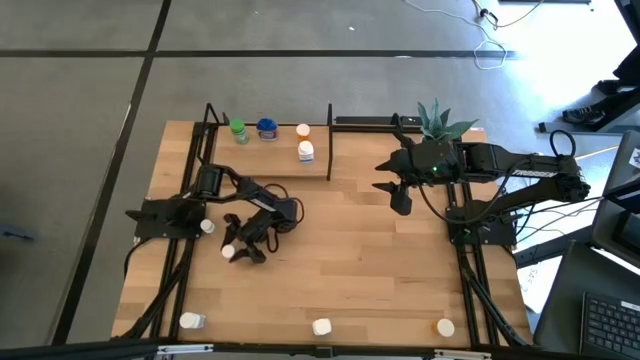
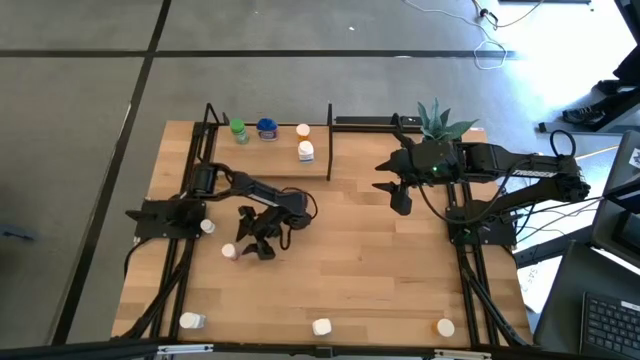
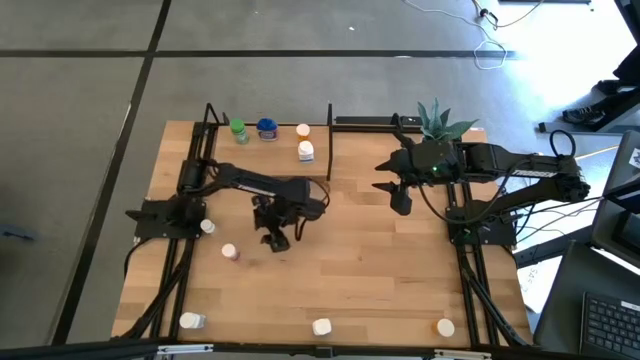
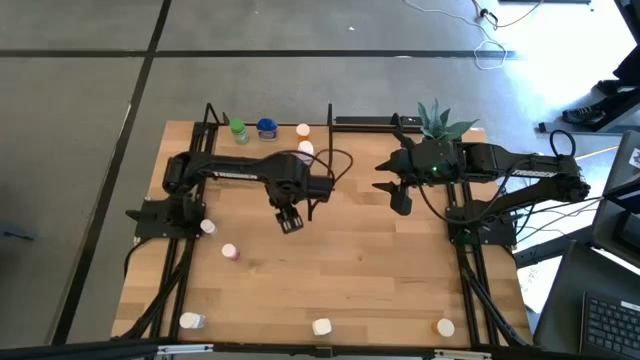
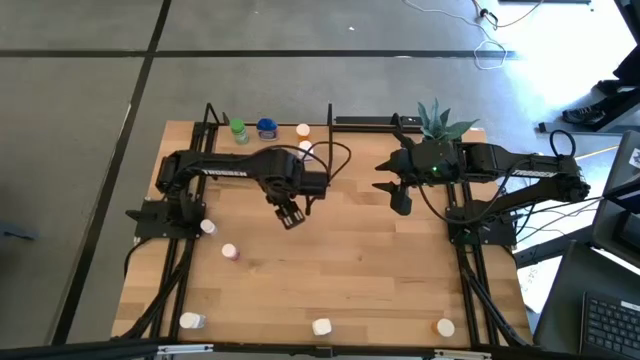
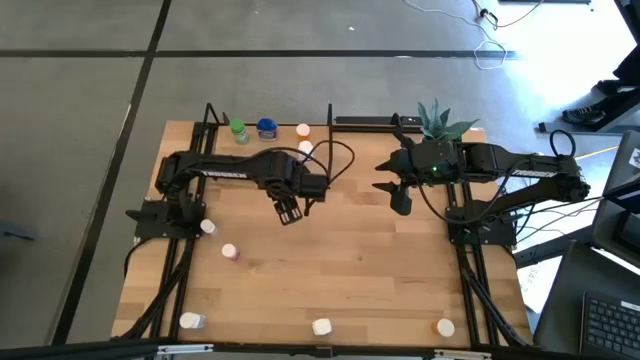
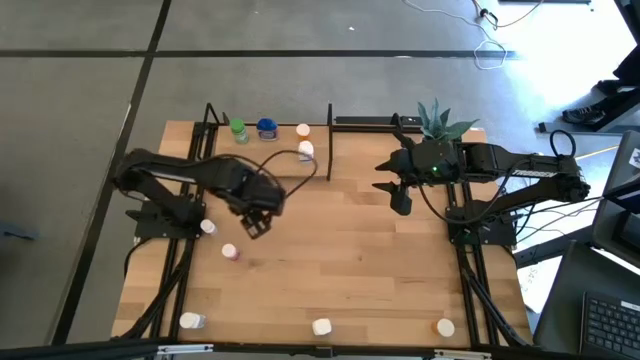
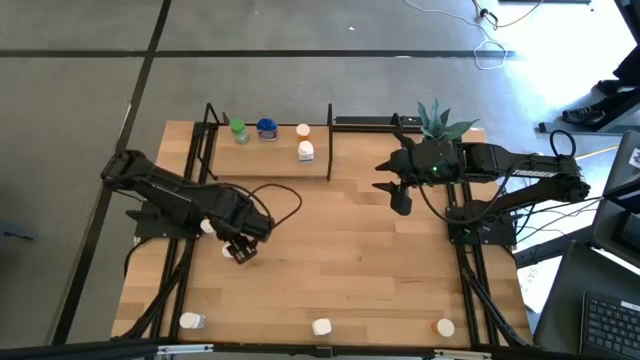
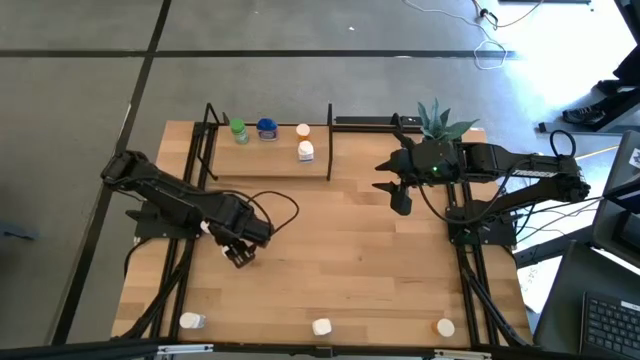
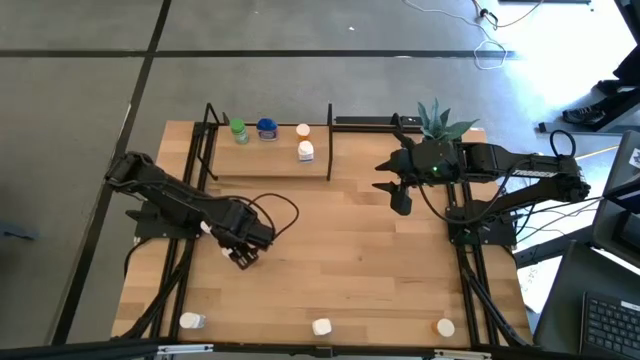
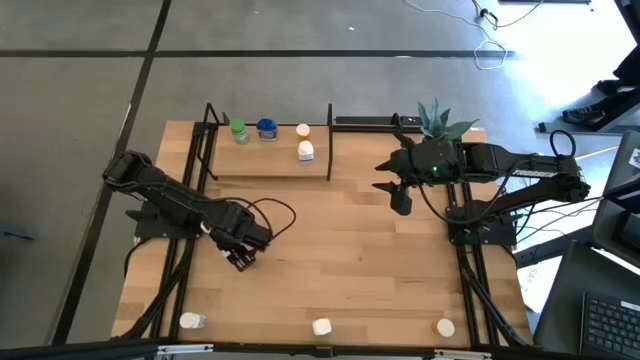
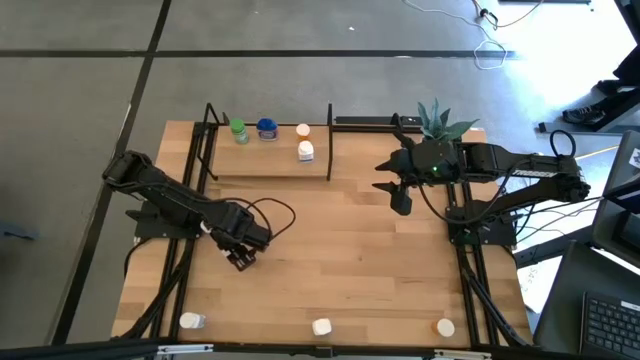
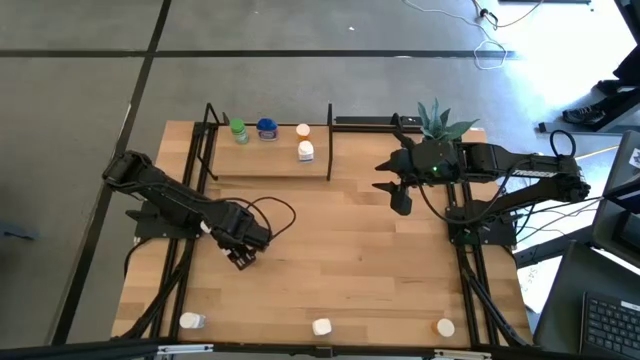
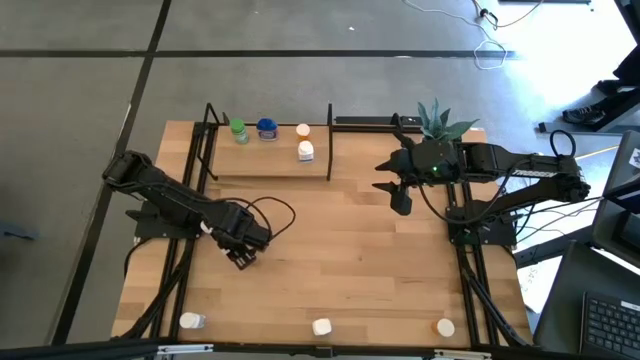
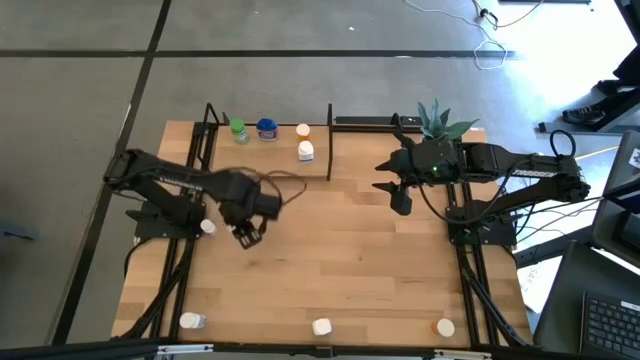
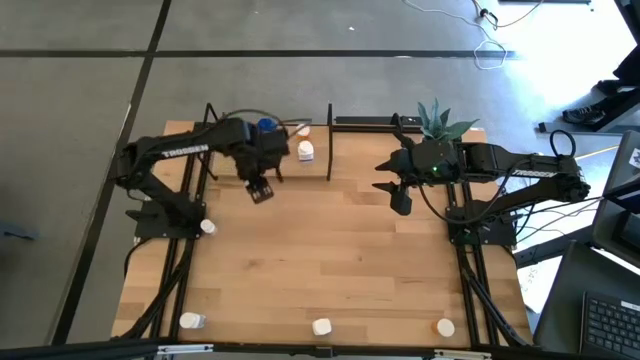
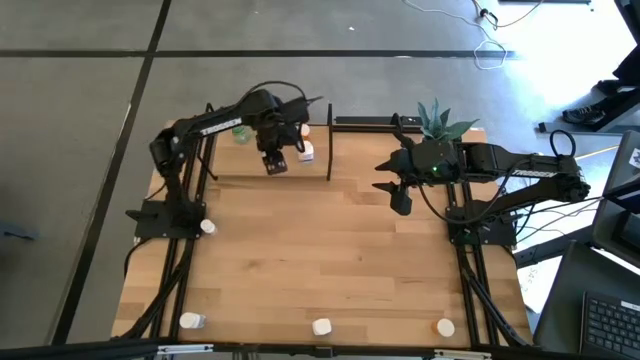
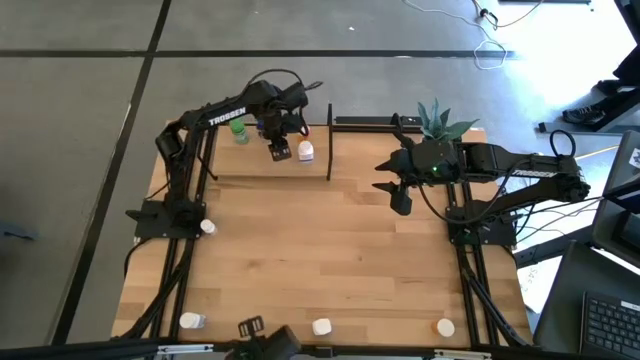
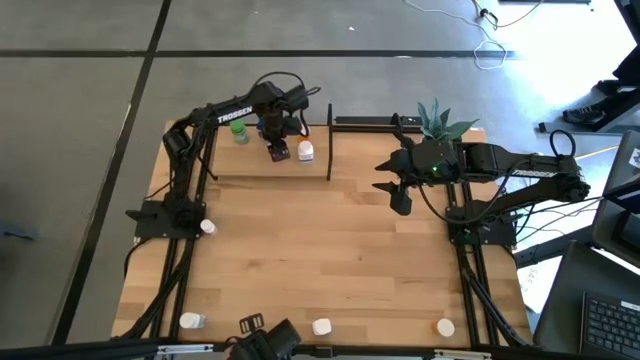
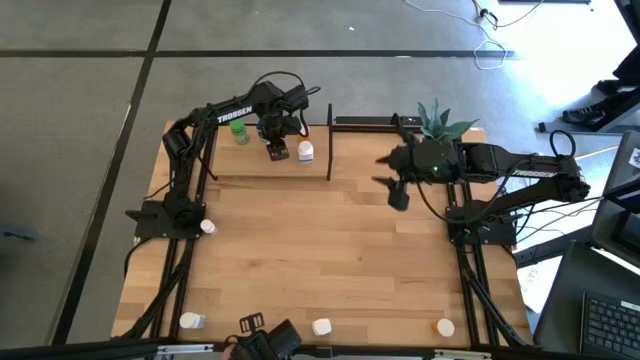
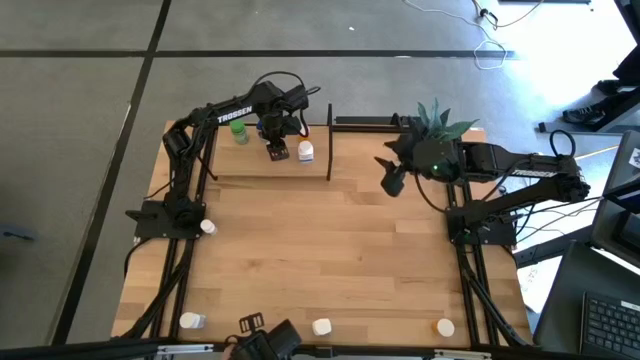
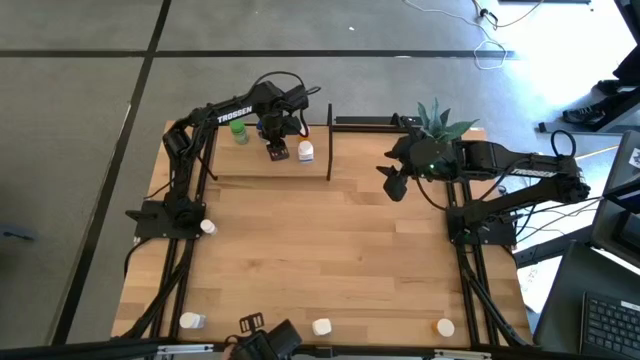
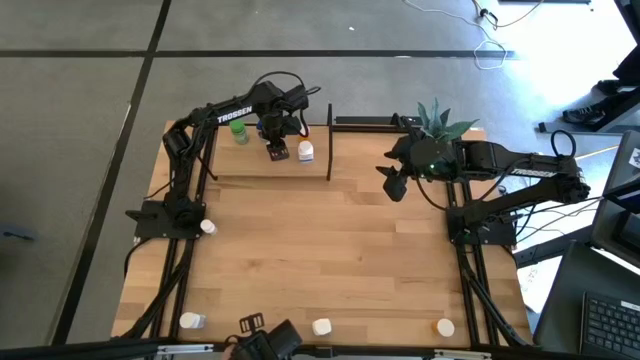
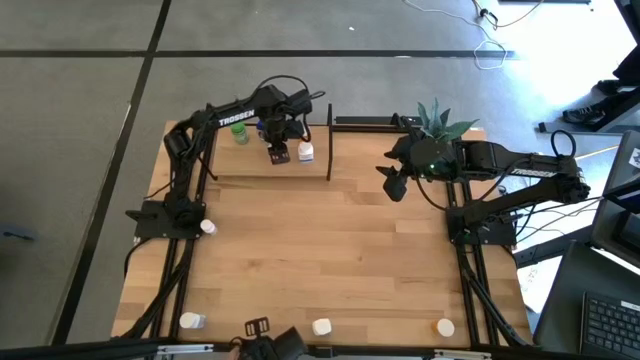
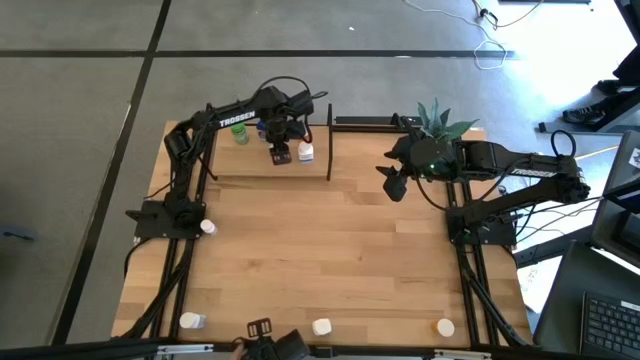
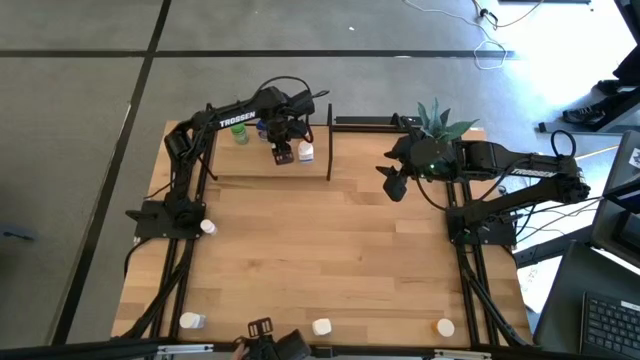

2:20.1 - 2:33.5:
Task: Pick and place medicine bottles onto shelf by color
Put the pink pill bottle on the shelf
